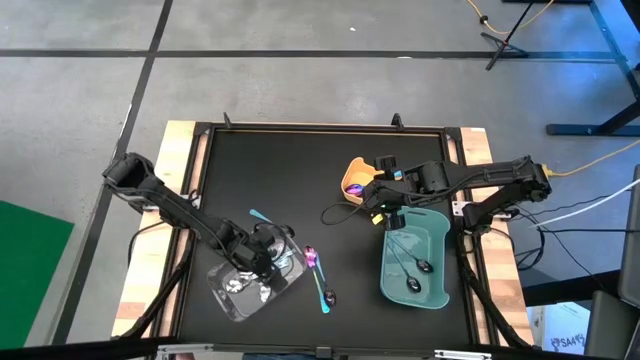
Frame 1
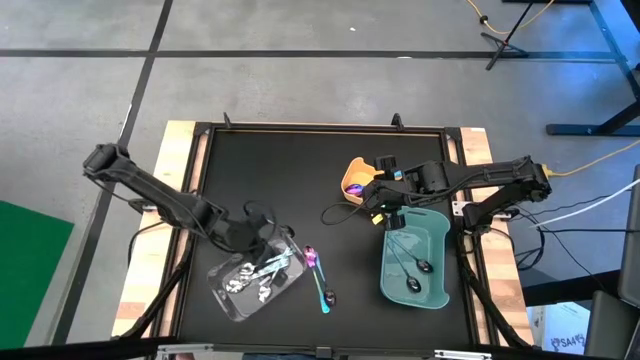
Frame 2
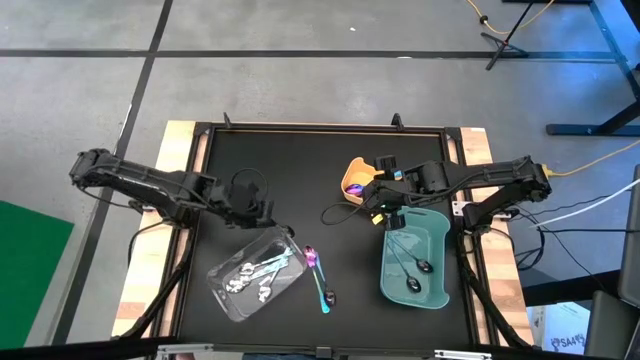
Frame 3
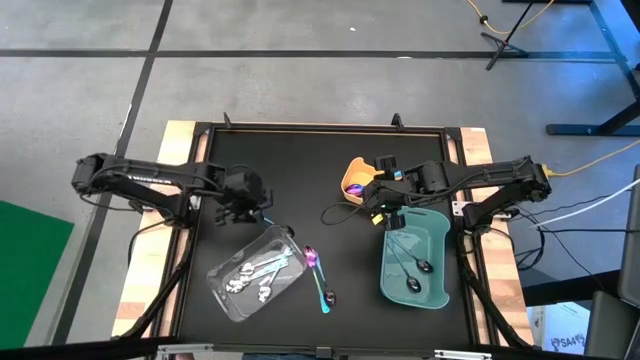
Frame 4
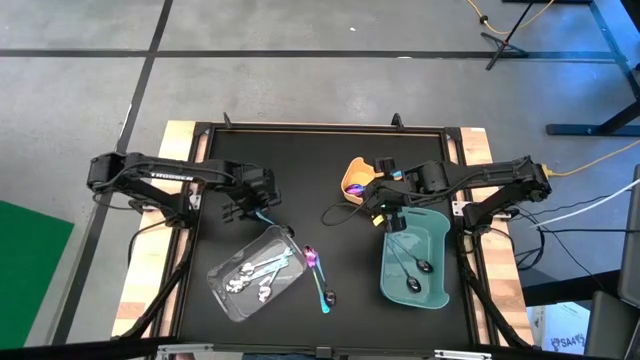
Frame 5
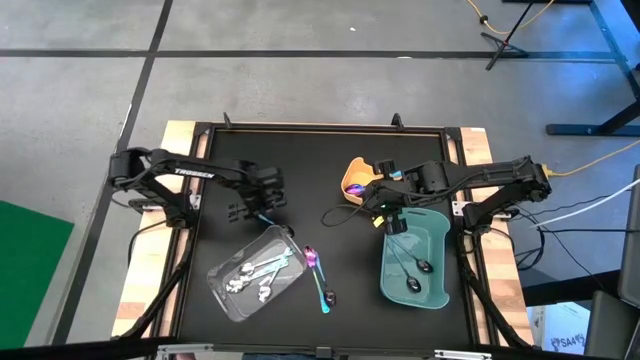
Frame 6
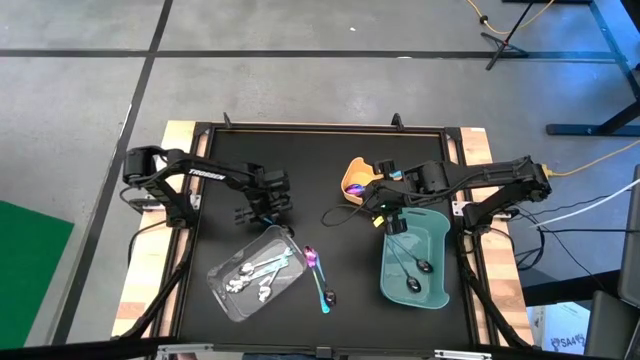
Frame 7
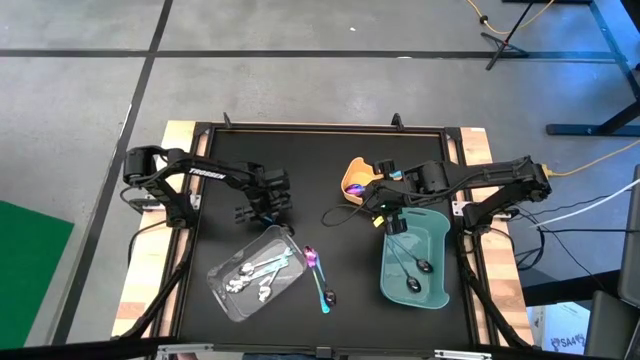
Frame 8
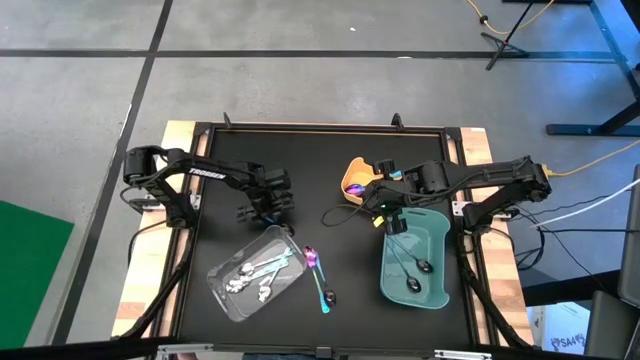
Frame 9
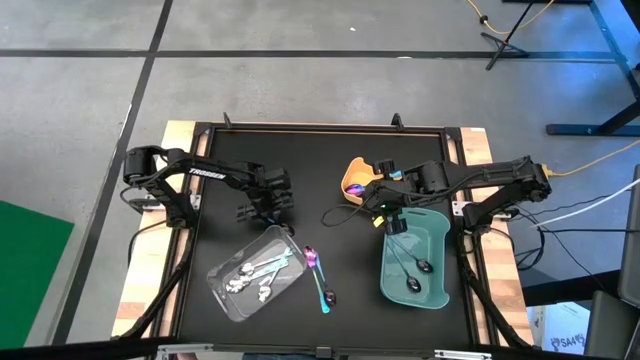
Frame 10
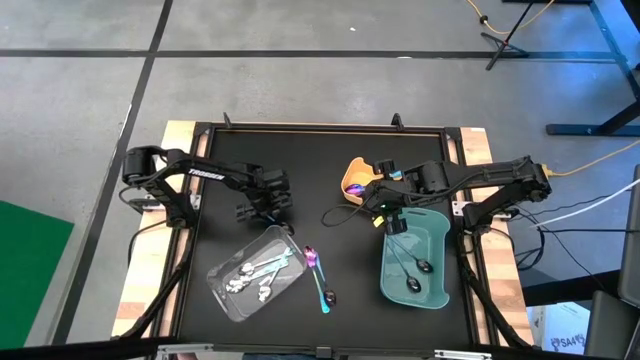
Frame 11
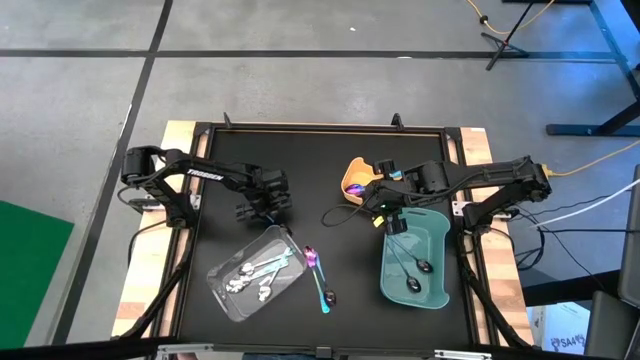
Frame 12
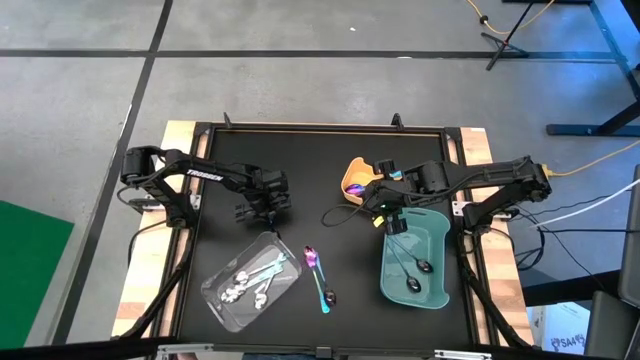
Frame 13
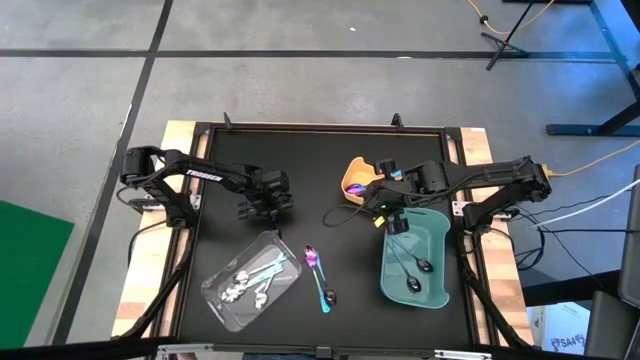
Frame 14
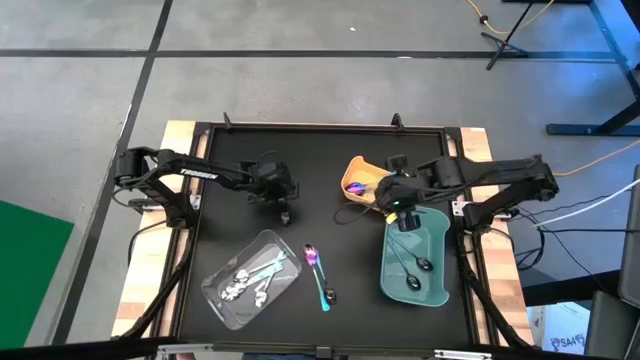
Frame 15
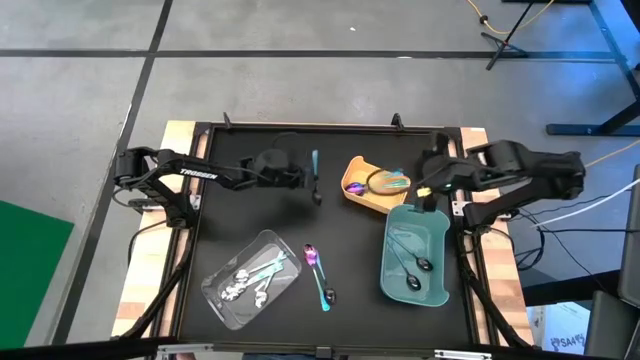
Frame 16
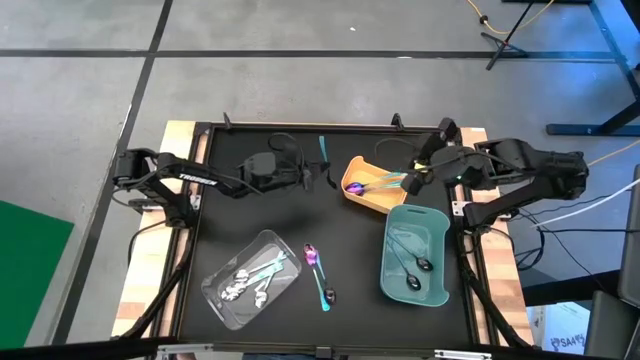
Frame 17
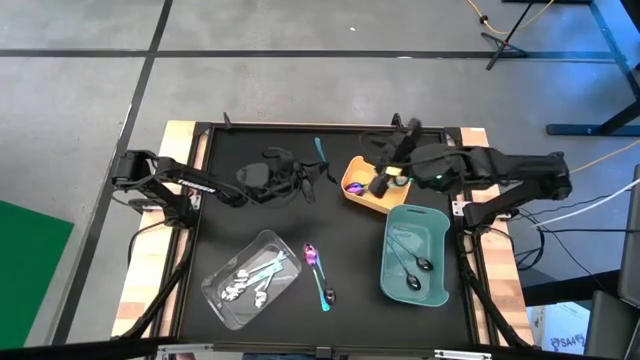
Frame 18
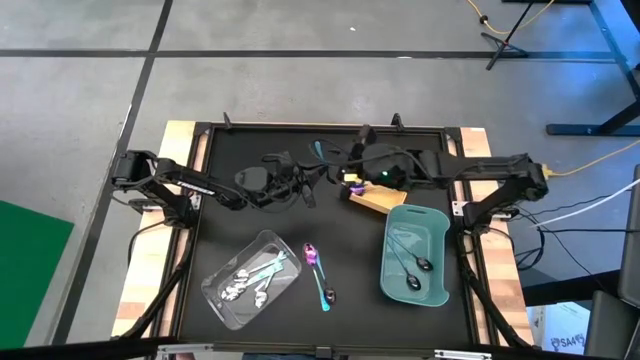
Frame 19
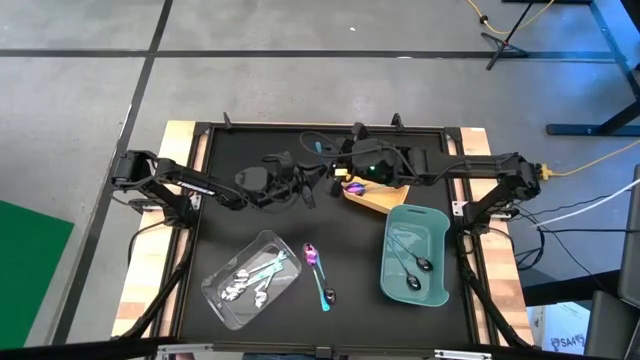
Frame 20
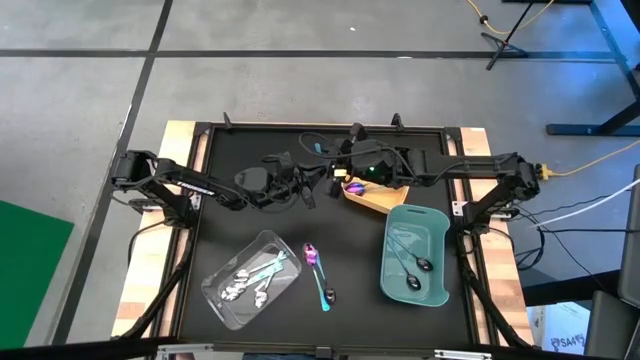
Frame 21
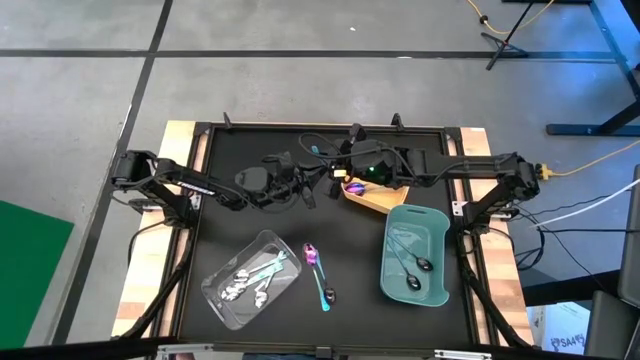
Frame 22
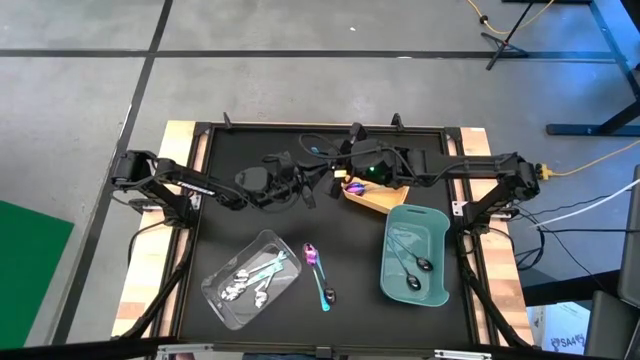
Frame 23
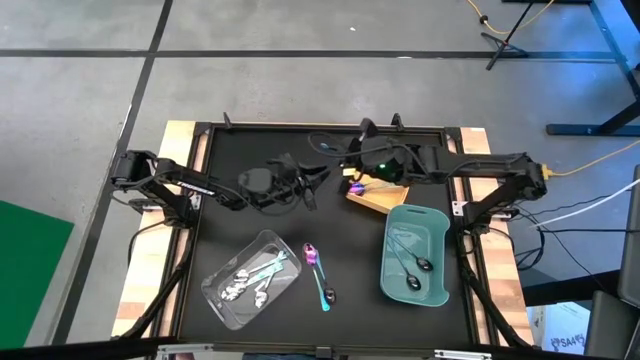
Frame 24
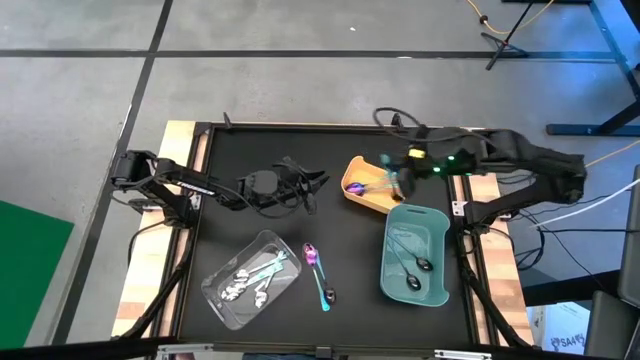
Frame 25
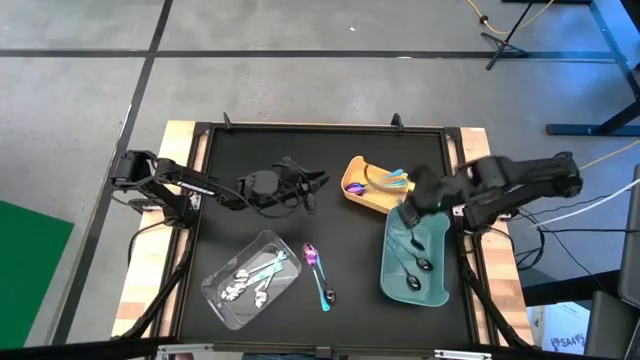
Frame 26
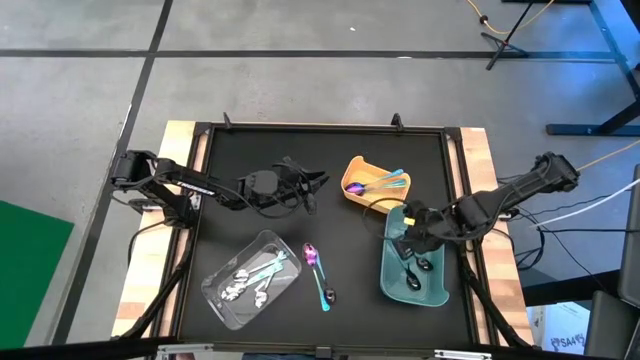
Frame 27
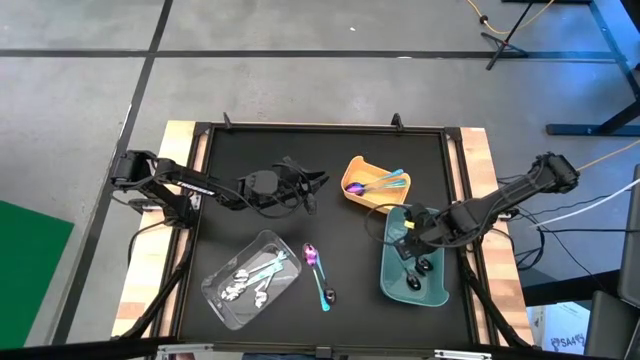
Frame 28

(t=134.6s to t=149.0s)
Task: Sort silverware by color (type)
Put the blue spoon into the blue bin

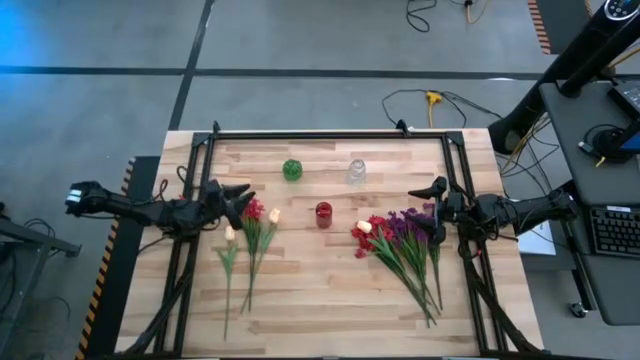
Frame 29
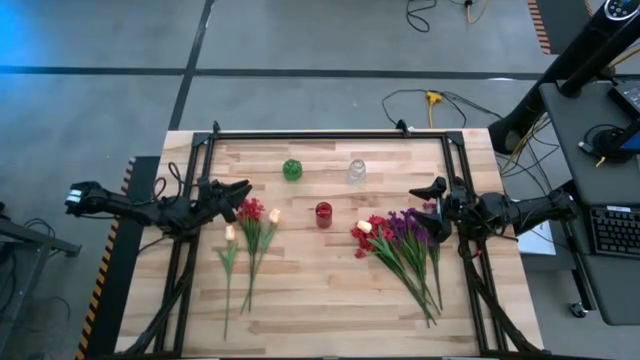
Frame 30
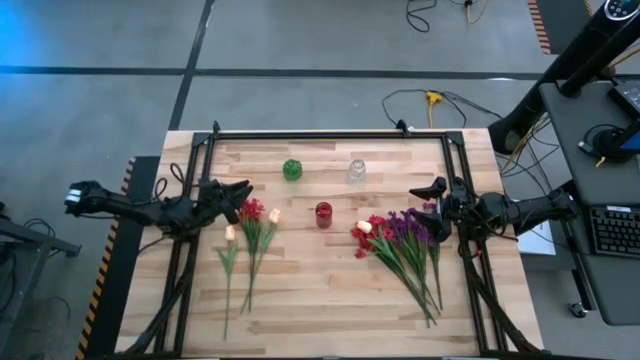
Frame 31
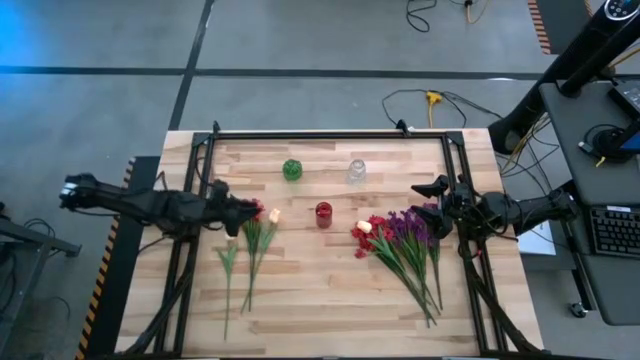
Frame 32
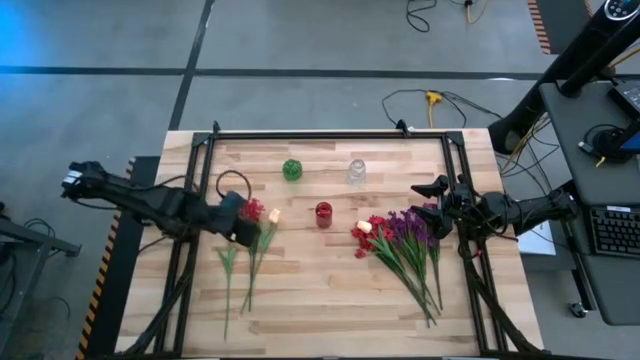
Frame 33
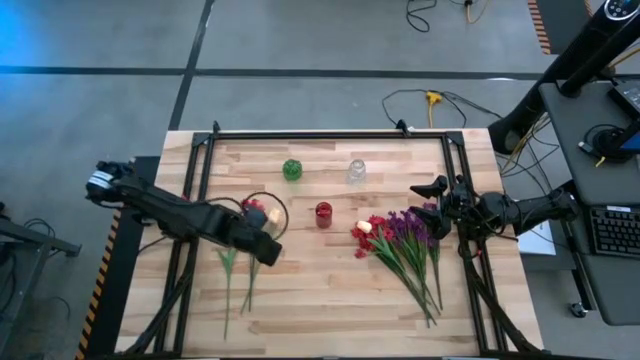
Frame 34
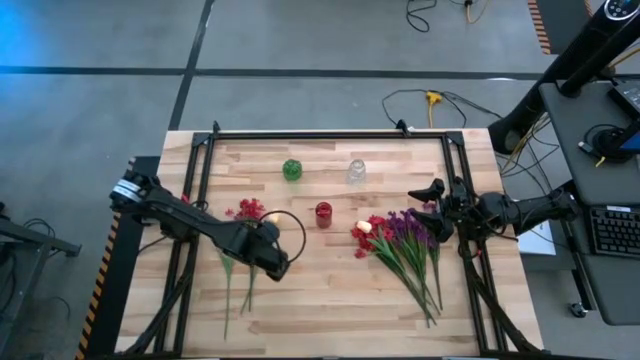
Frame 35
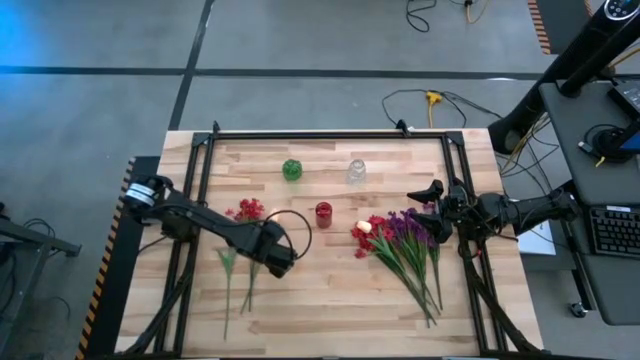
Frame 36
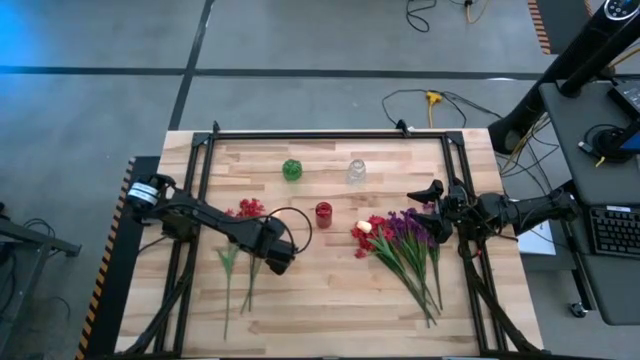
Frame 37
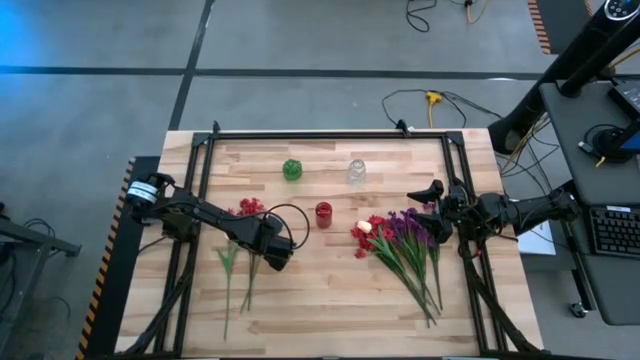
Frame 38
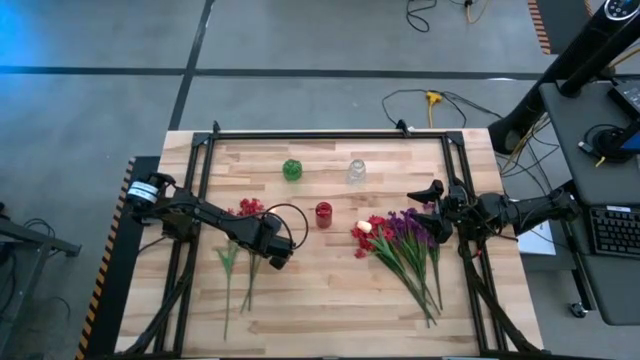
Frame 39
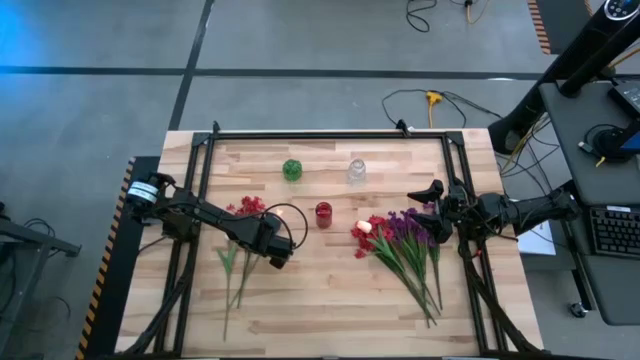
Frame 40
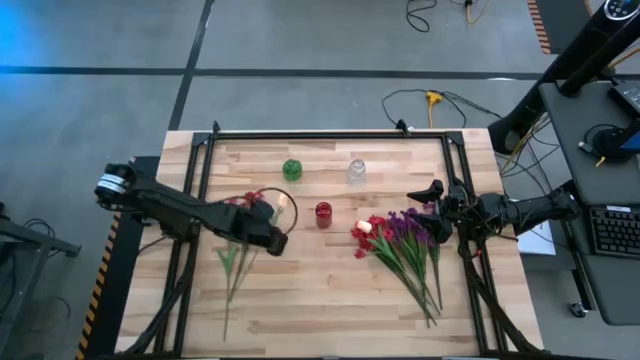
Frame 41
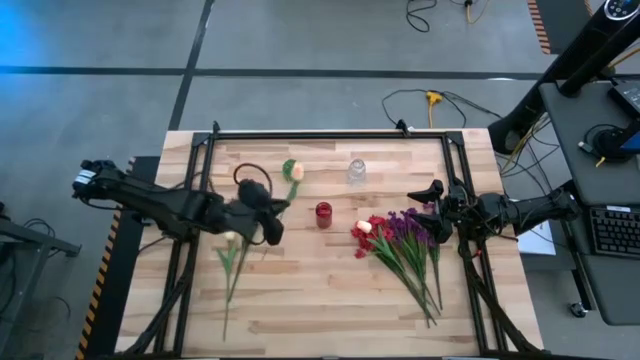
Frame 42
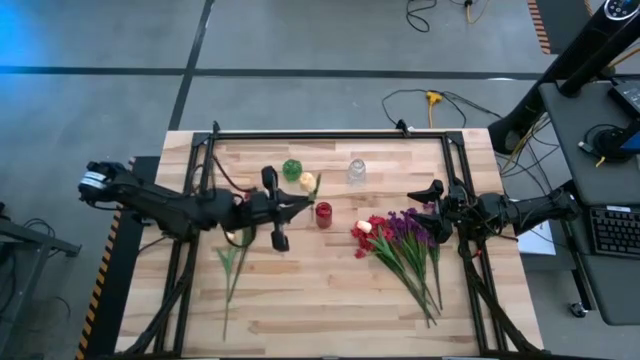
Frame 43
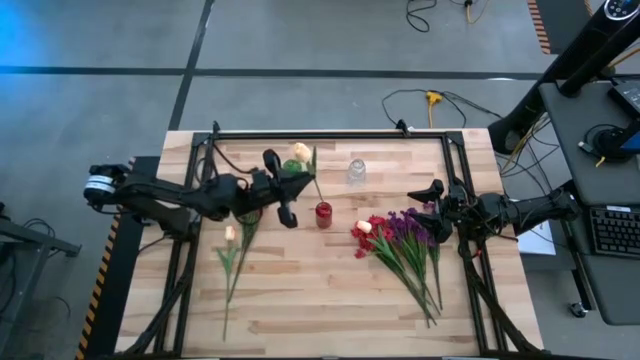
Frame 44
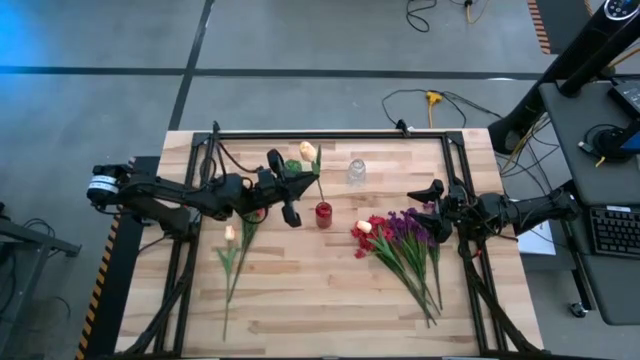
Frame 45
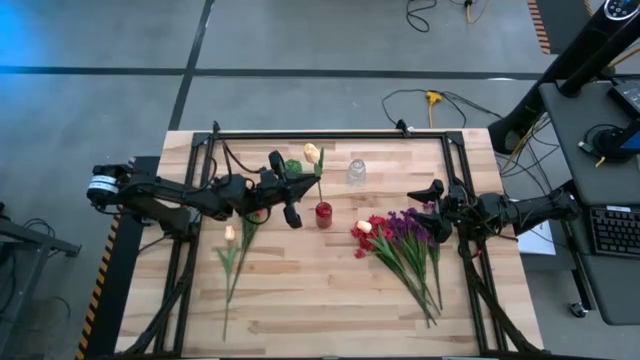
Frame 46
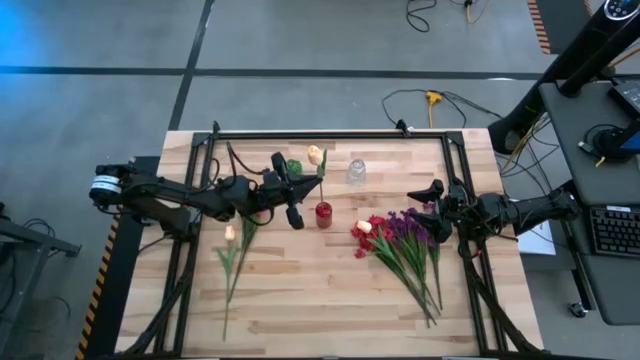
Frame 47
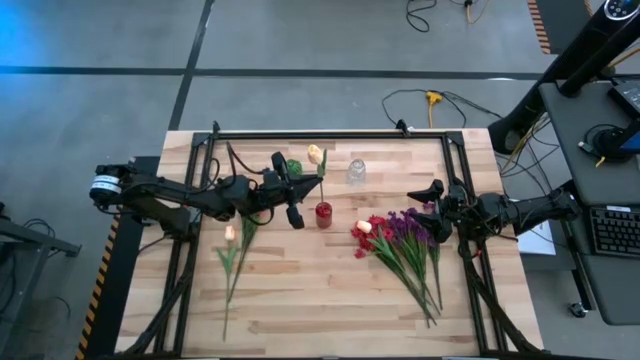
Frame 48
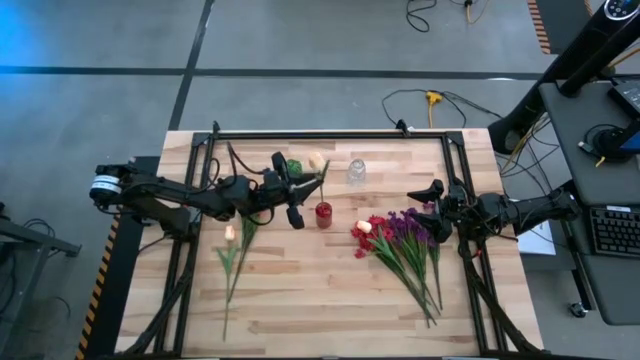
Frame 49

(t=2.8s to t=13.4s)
Task: Sort flowers into vase by color
Put the yellow tulip into the red vase
